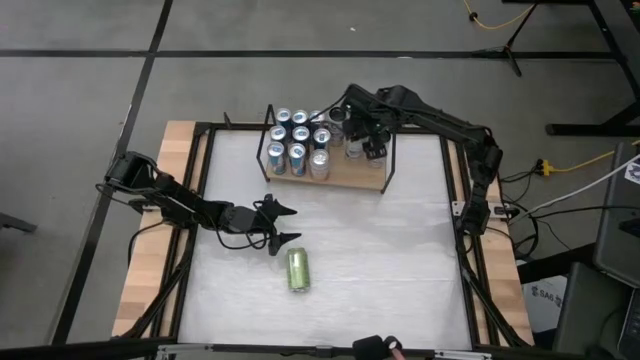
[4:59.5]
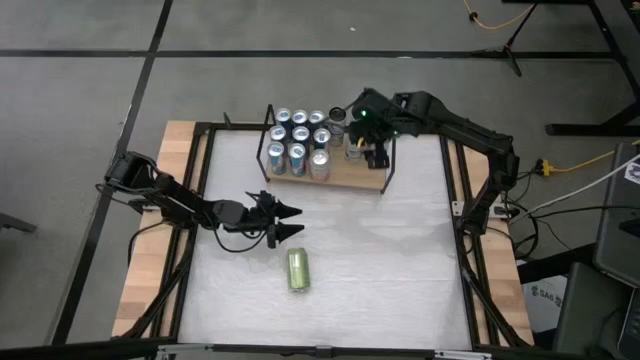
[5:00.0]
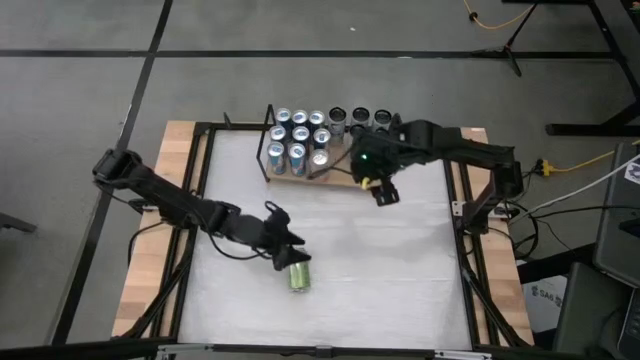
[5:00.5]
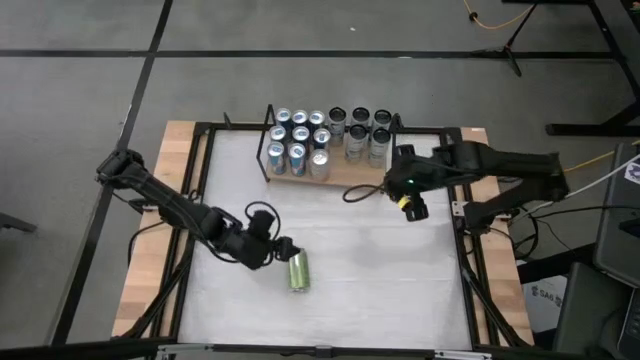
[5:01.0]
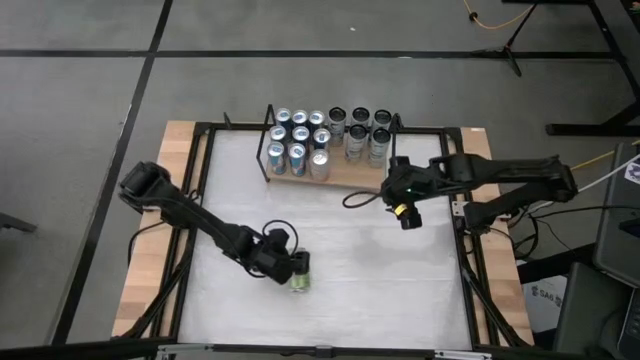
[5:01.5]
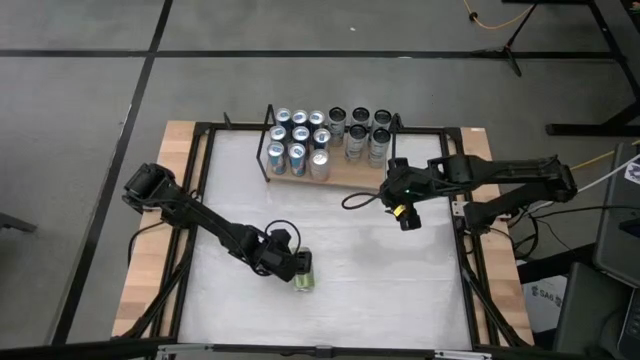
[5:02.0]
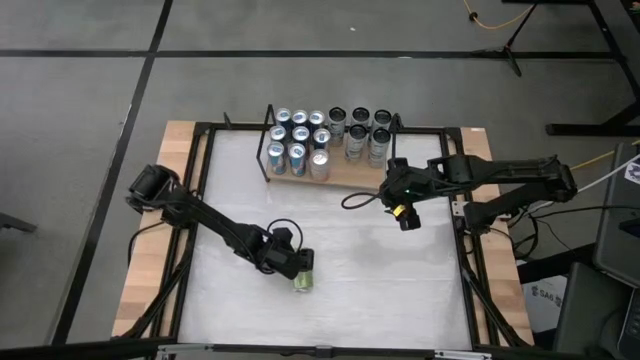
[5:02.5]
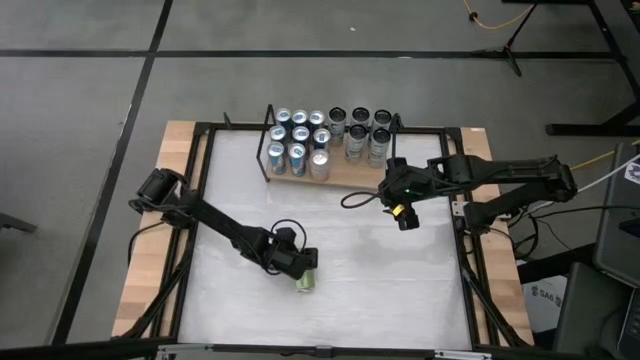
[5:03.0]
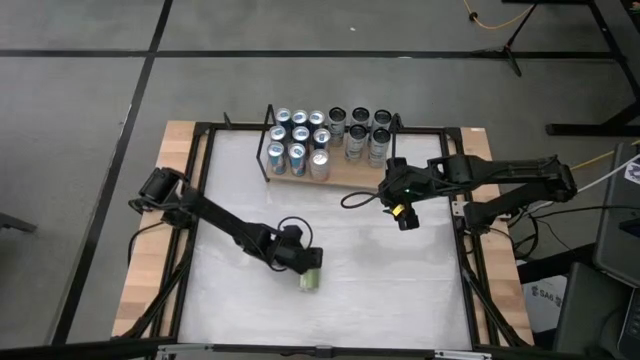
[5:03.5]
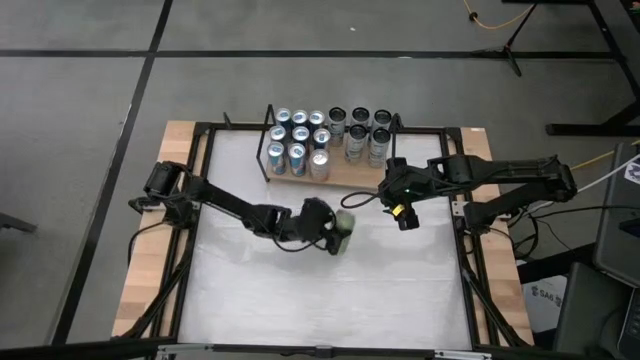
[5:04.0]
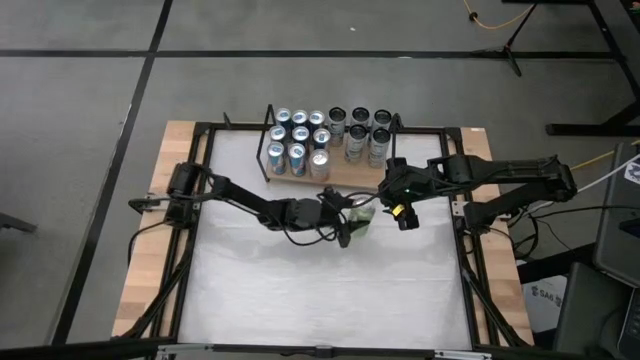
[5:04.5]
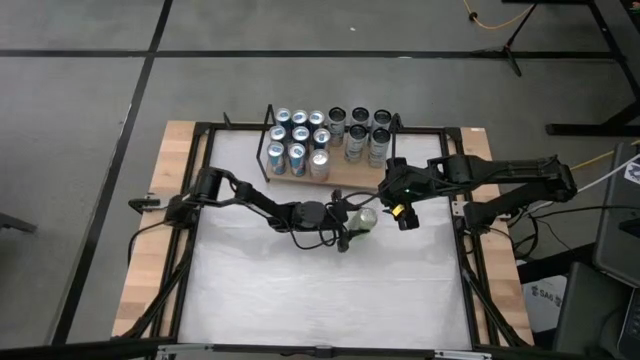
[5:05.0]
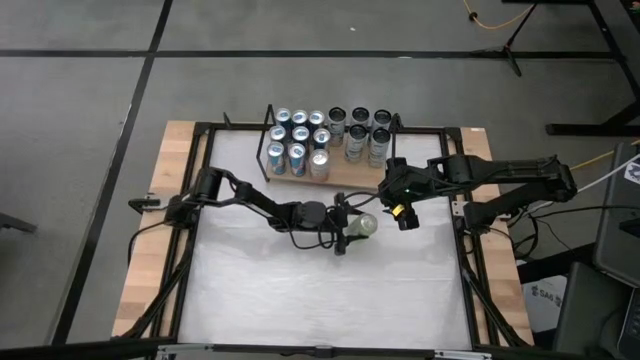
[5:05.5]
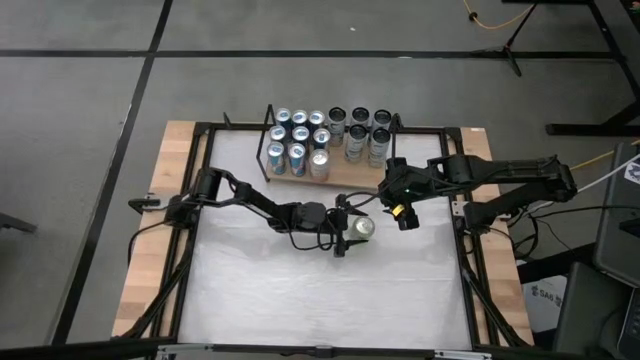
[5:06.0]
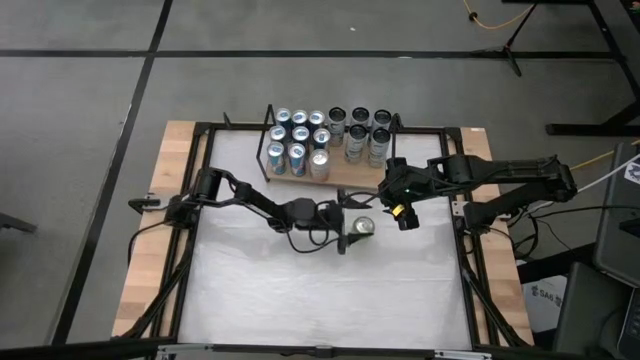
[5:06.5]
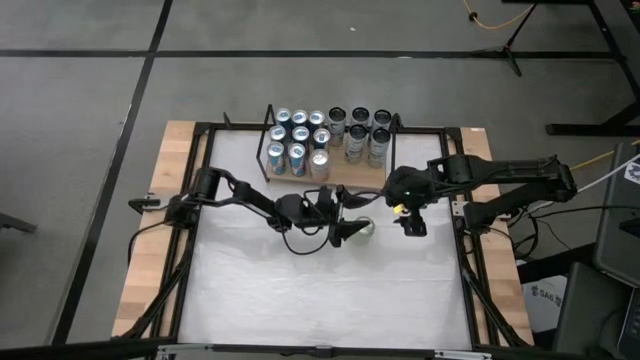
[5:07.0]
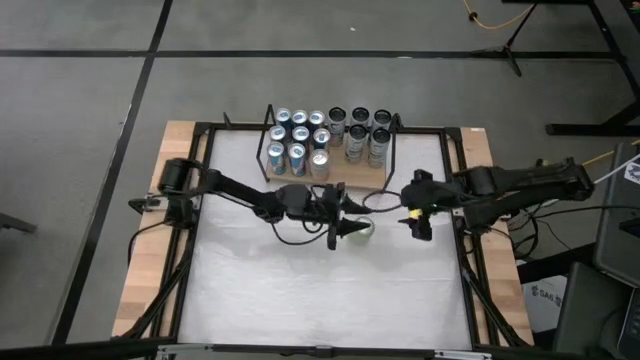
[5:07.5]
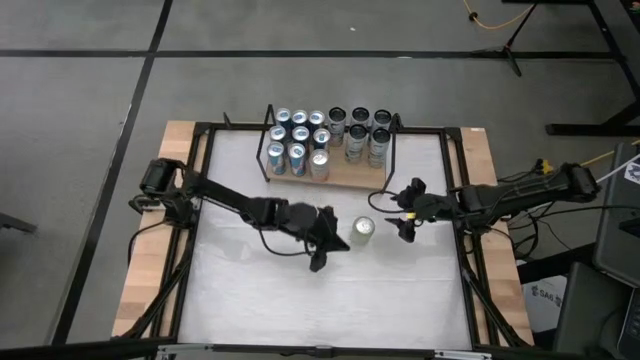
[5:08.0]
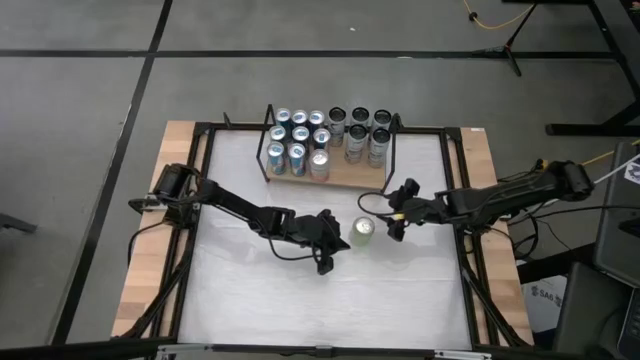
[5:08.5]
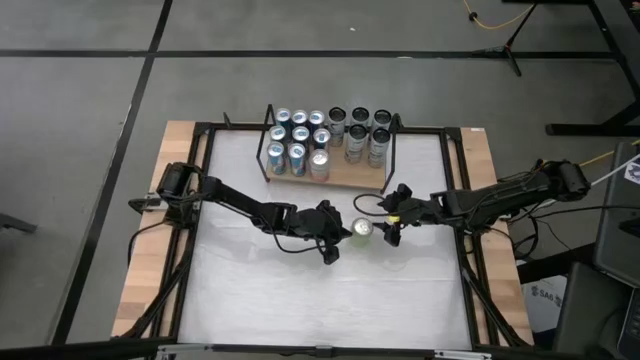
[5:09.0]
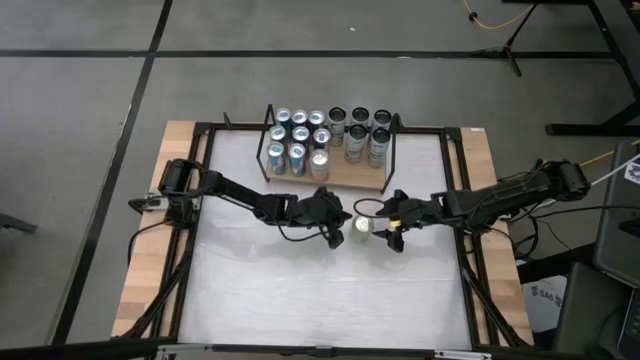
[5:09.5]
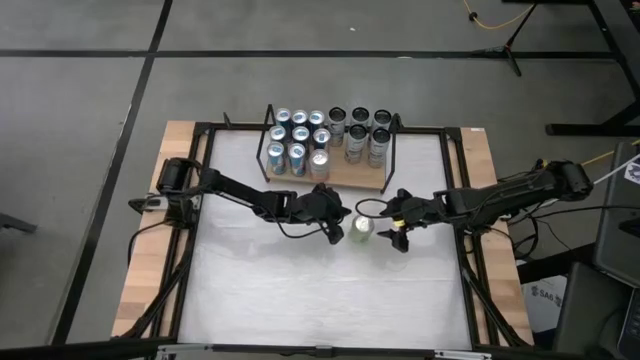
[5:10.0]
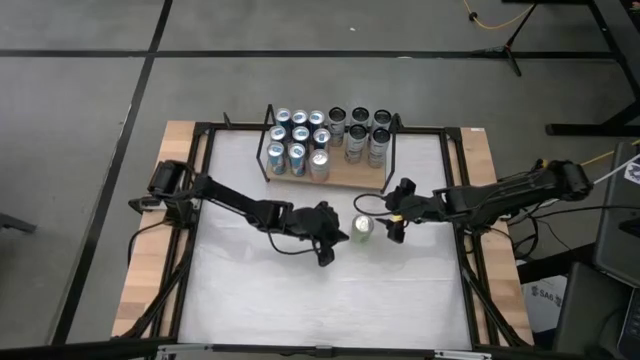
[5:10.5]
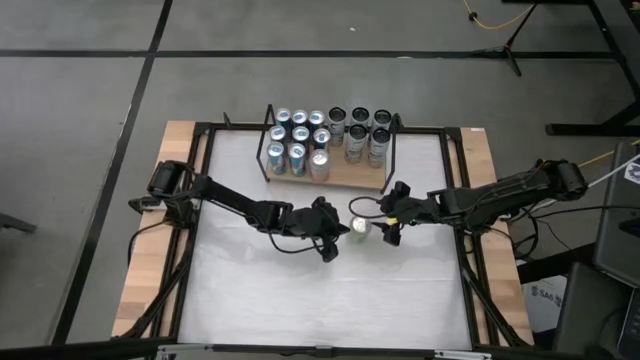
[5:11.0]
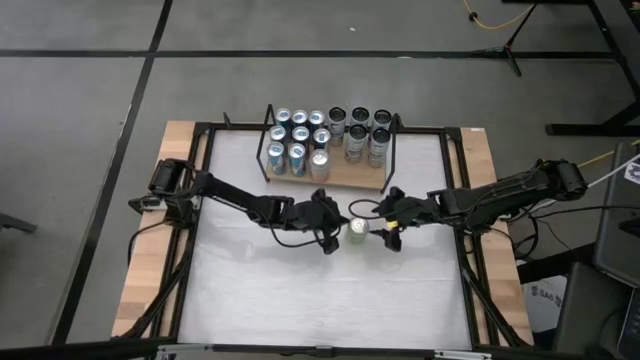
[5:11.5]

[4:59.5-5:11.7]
Task: Place canned beverage on shelf
Put the green soda can on the shelf

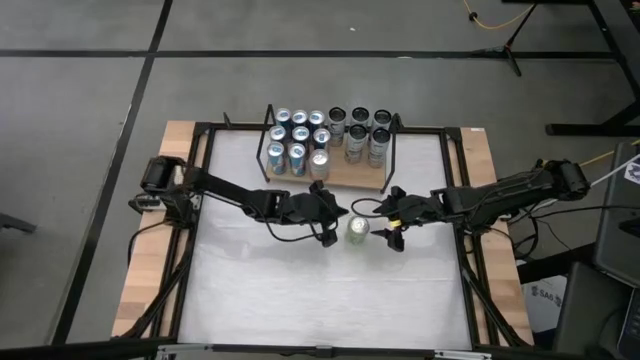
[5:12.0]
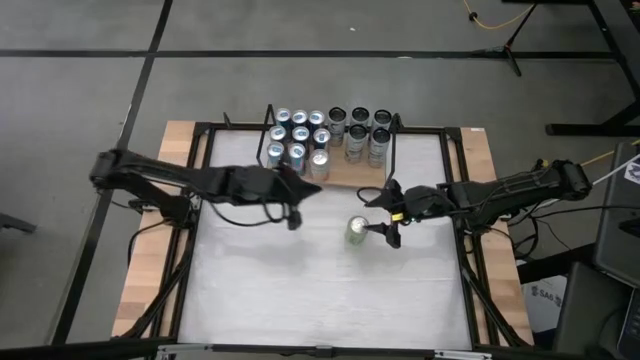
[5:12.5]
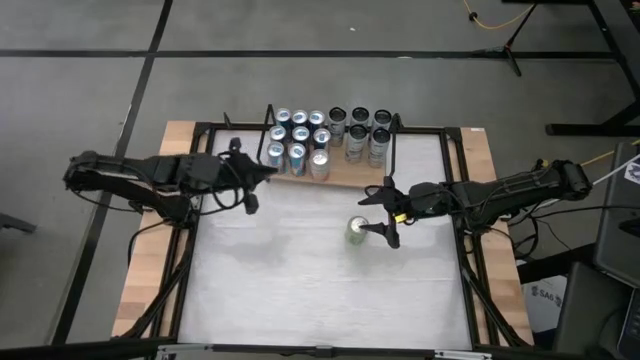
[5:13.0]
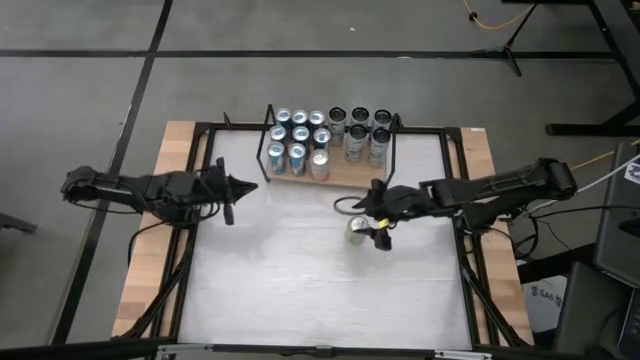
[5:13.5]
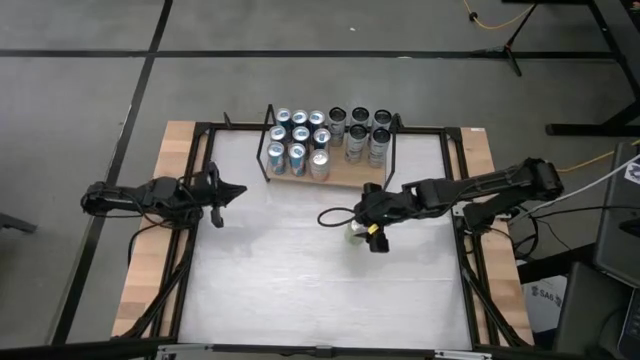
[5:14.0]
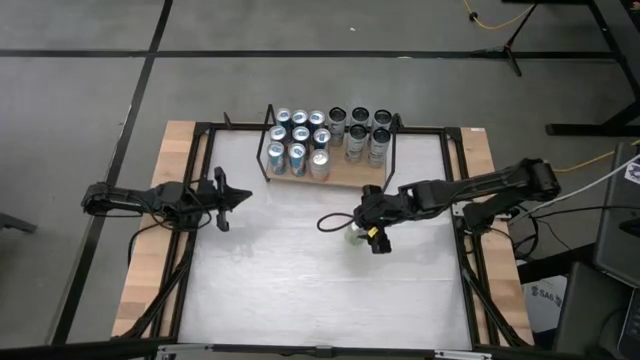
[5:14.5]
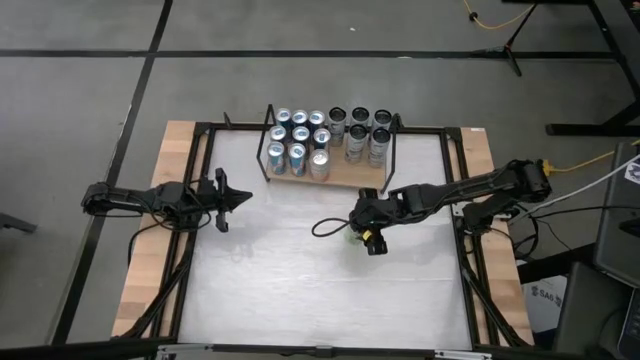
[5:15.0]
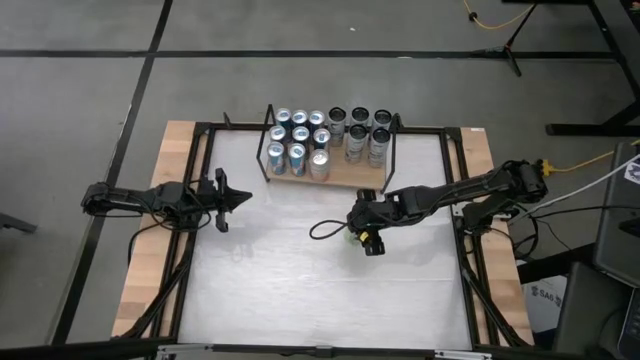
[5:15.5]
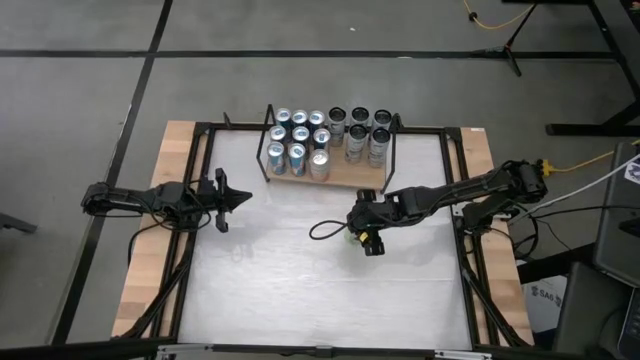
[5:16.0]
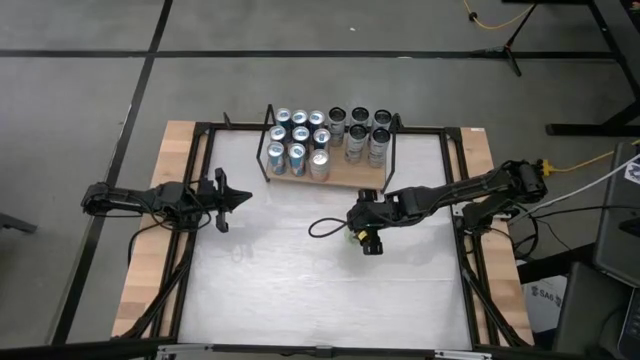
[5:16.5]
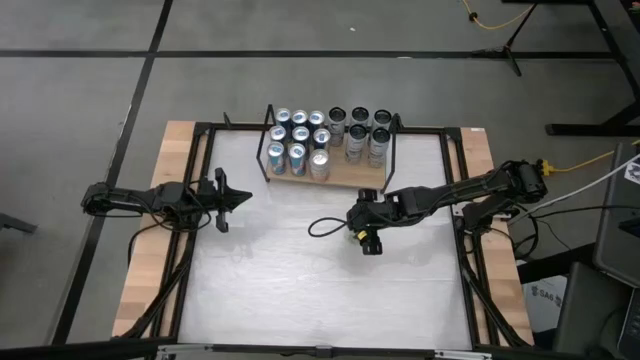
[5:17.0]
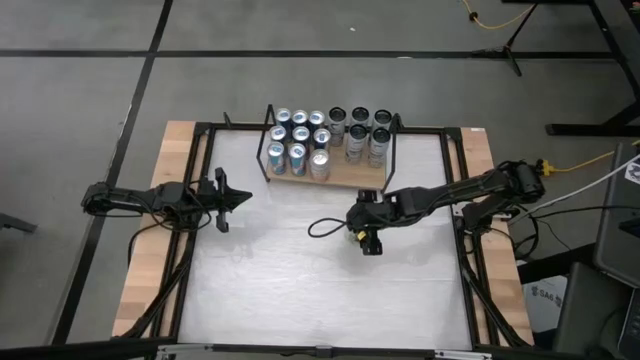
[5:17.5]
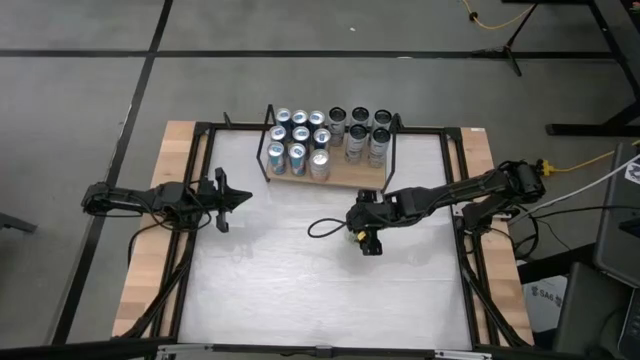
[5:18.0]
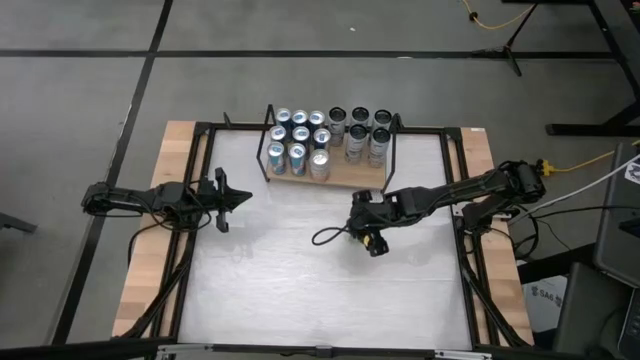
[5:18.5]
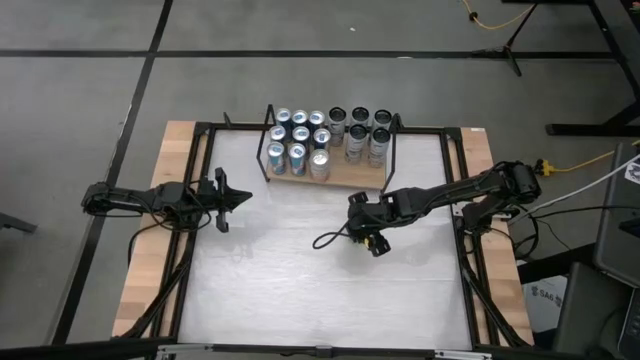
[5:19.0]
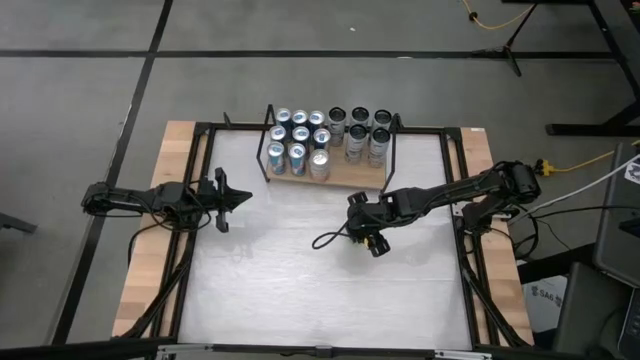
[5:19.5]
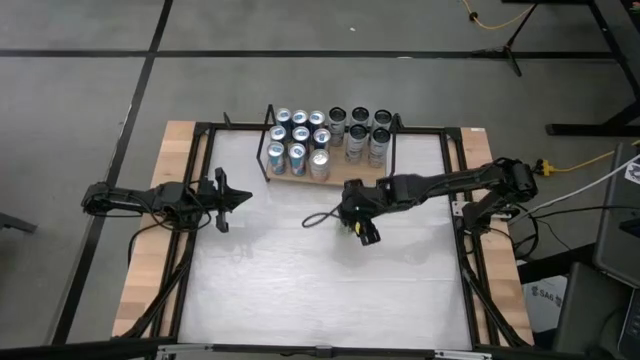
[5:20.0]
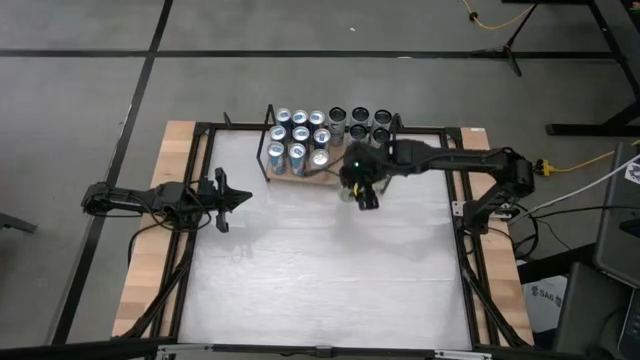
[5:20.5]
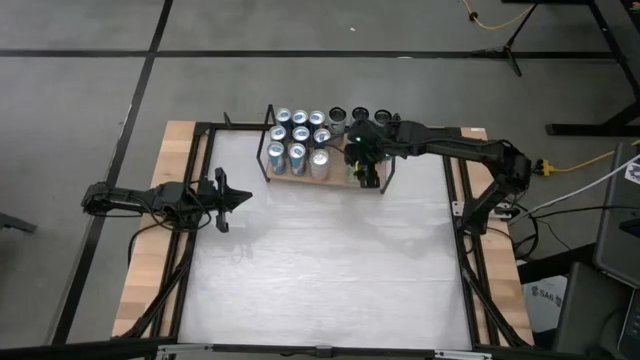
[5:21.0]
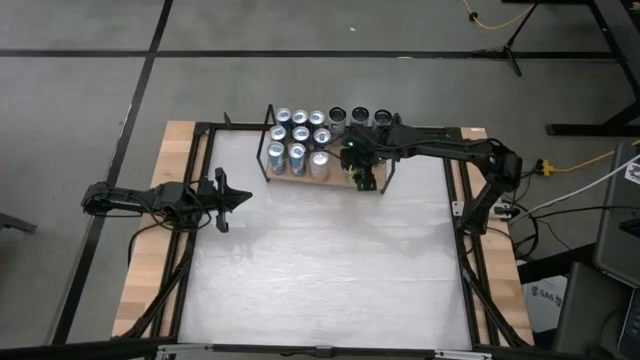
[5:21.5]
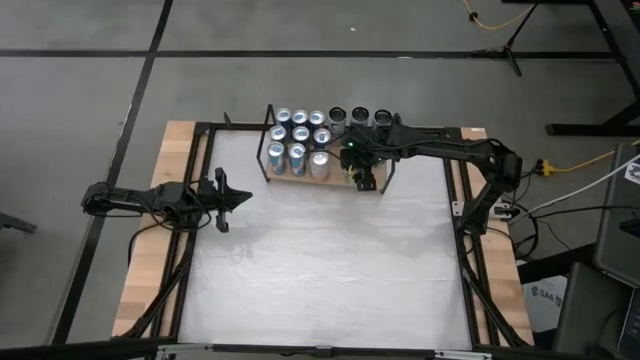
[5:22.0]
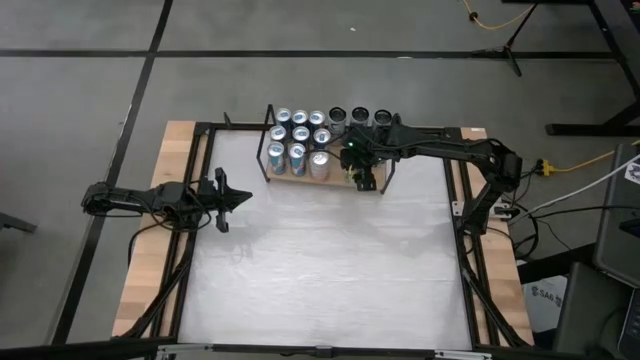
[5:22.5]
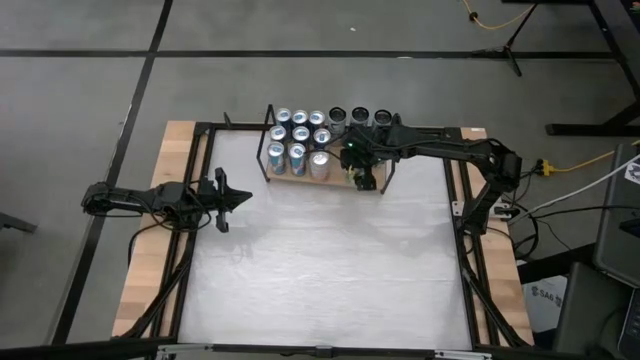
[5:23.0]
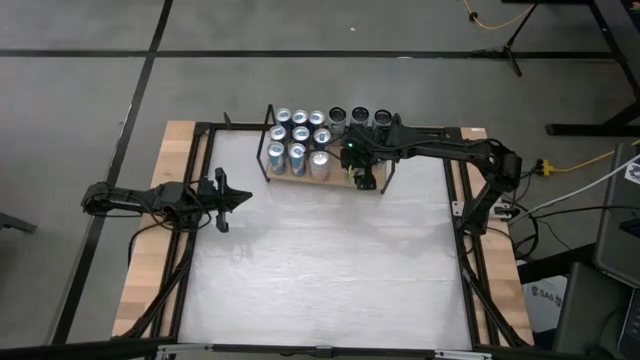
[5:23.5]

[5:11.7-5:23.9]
Put the green soda can on the shelf
